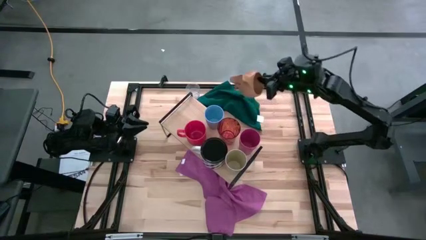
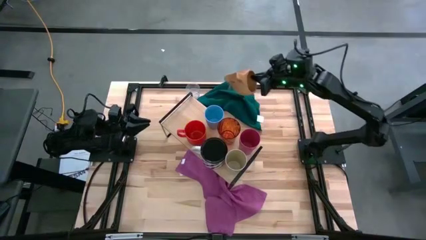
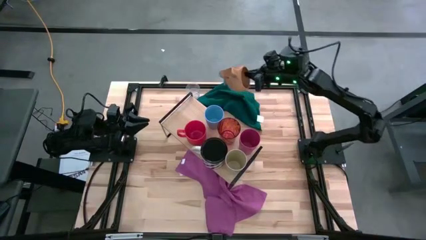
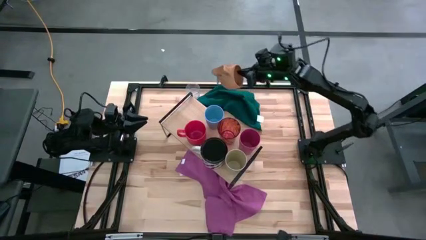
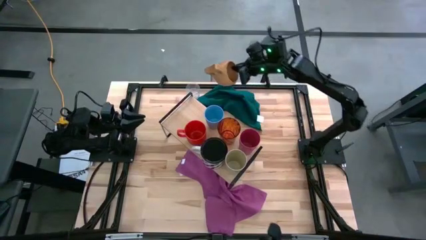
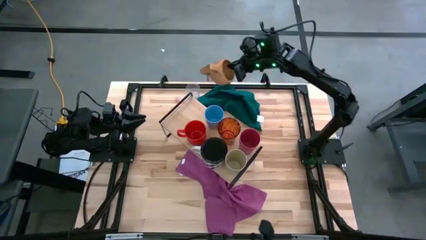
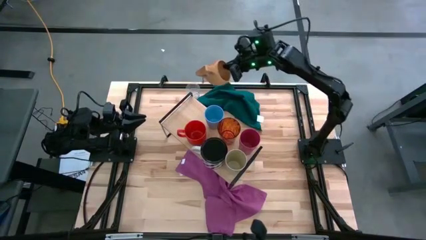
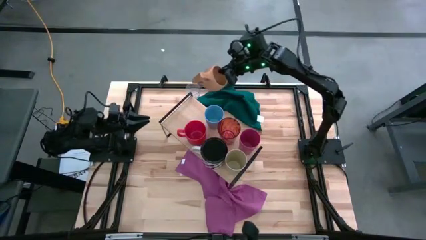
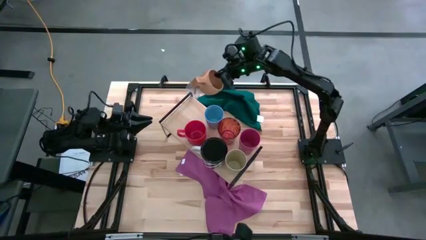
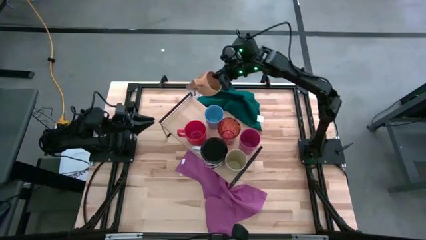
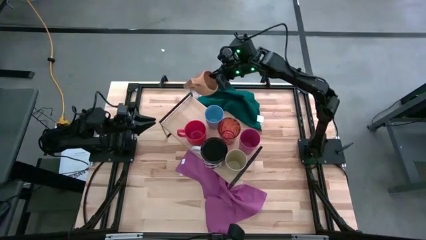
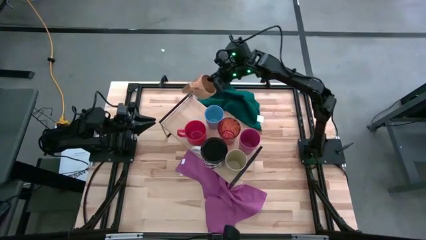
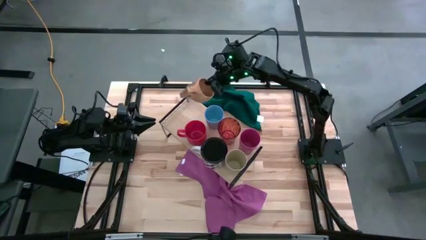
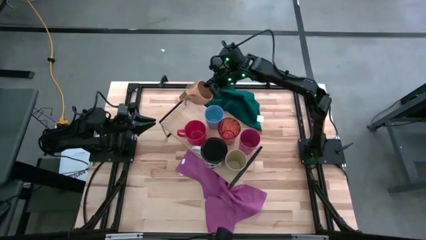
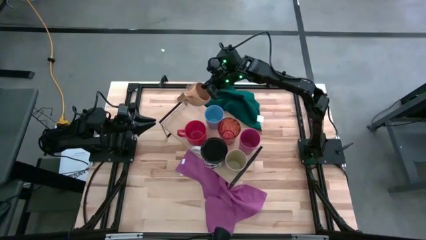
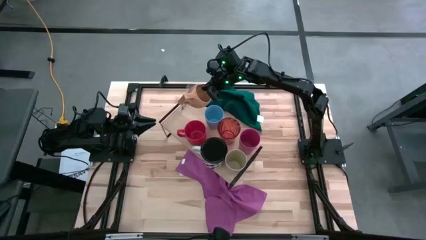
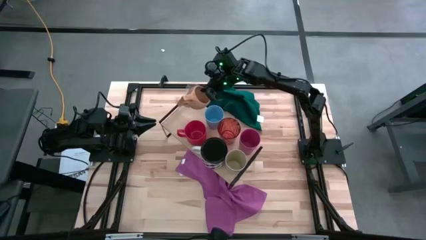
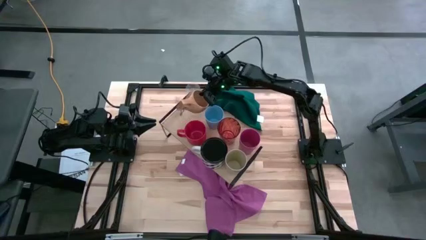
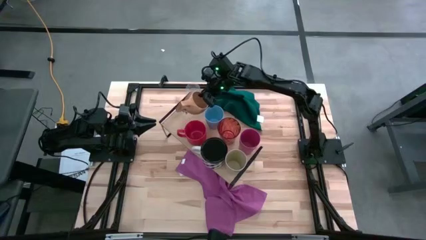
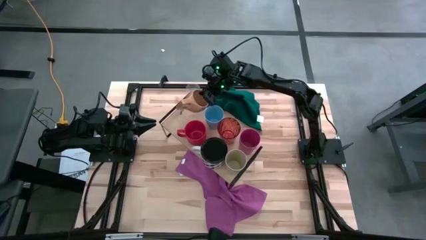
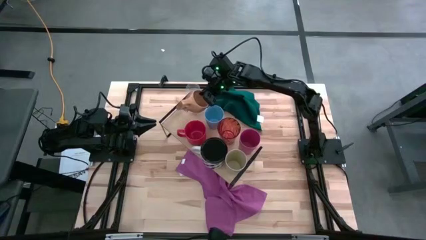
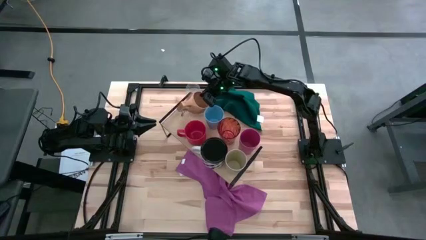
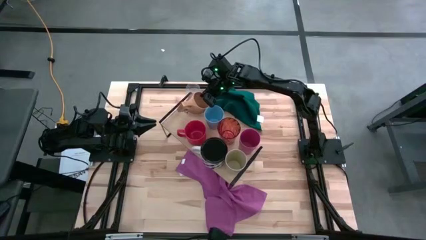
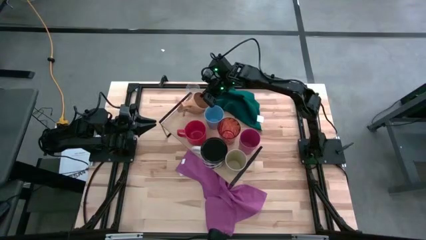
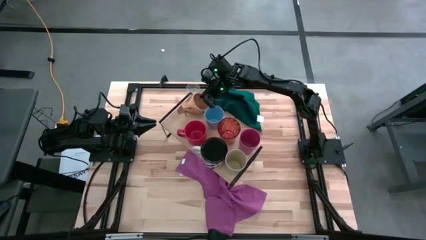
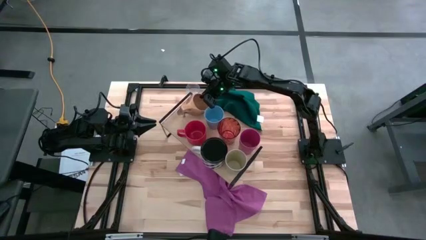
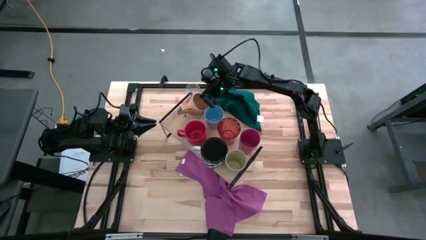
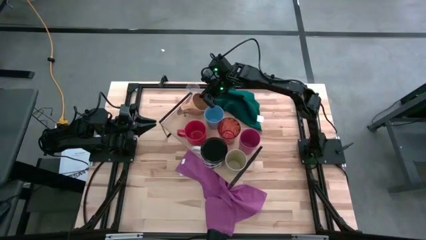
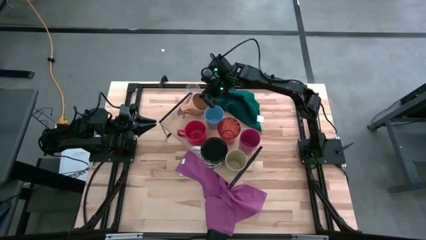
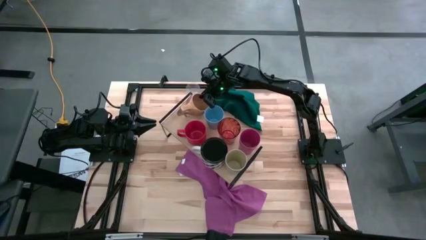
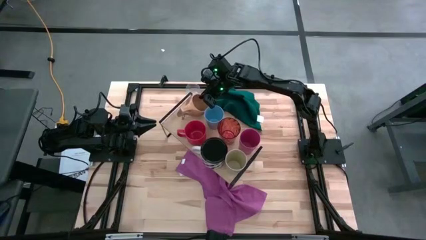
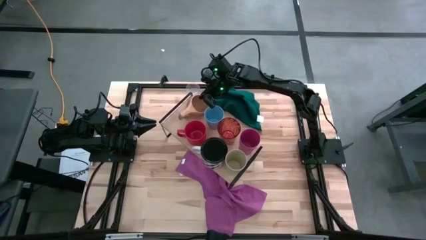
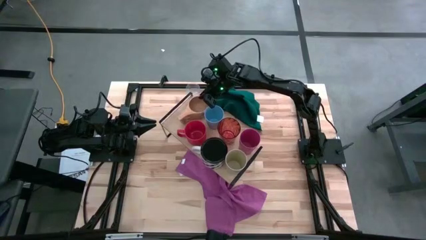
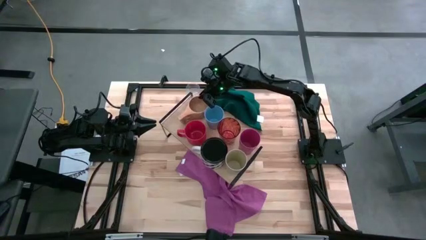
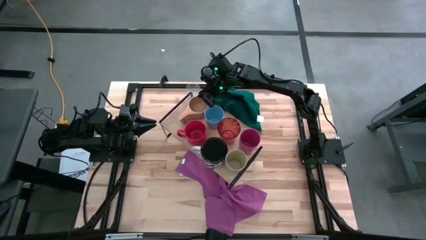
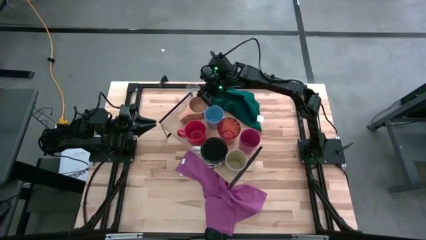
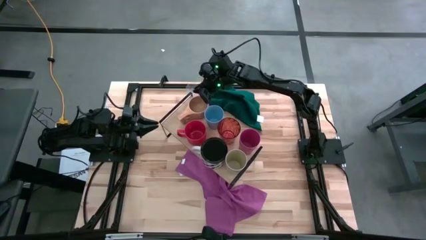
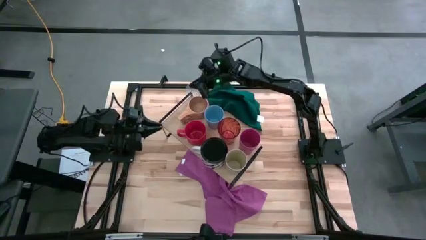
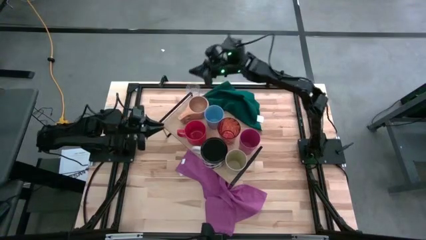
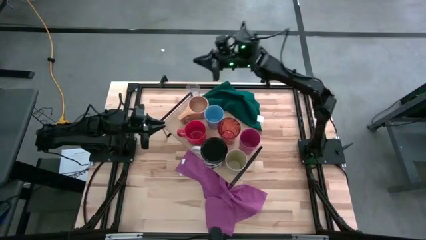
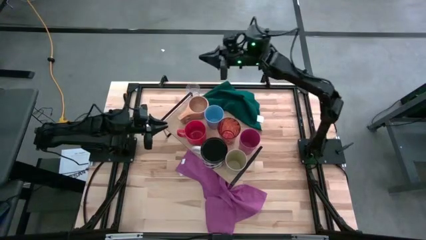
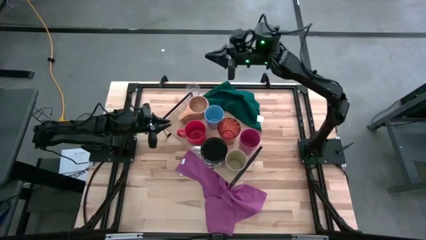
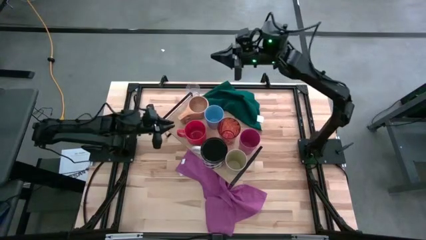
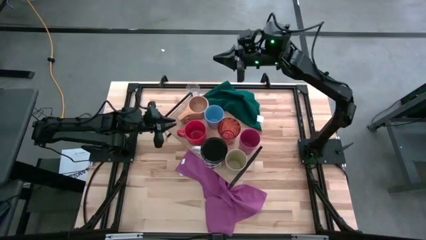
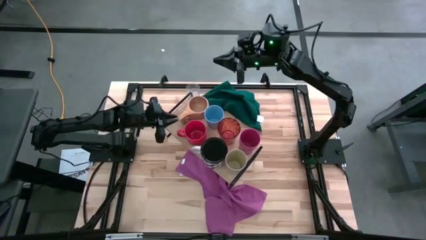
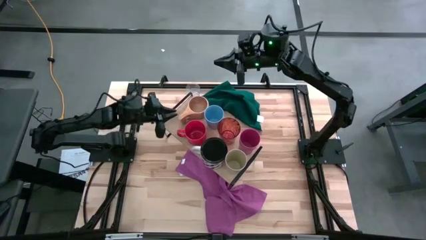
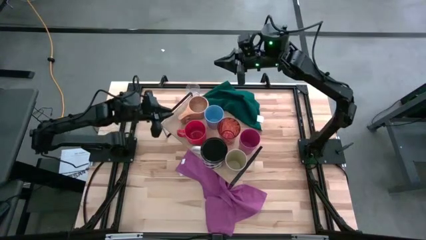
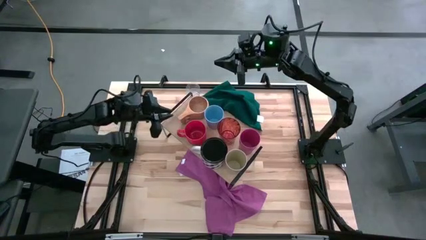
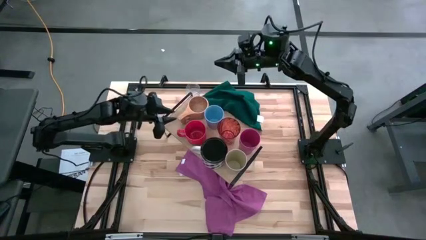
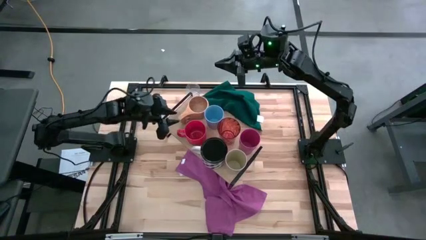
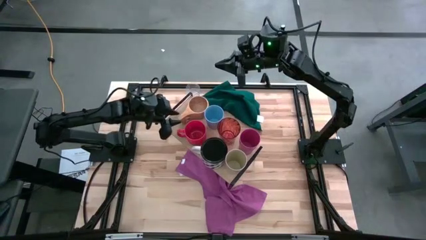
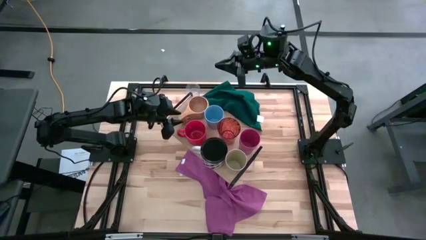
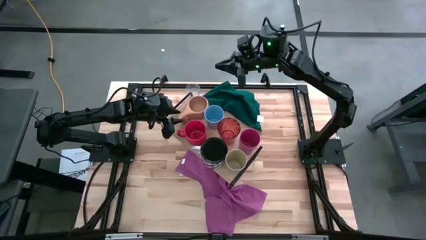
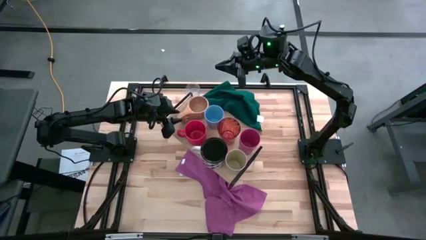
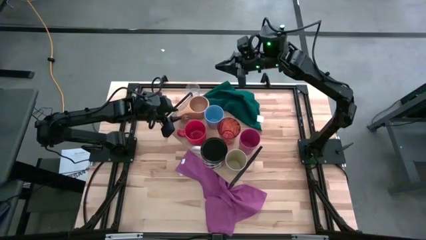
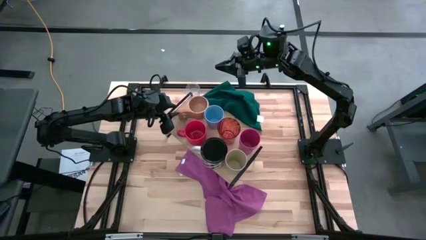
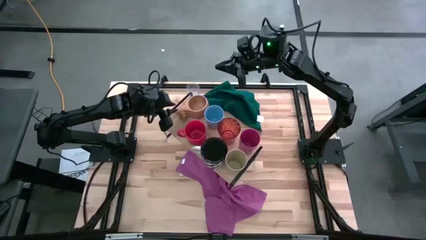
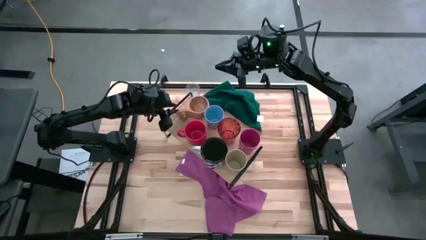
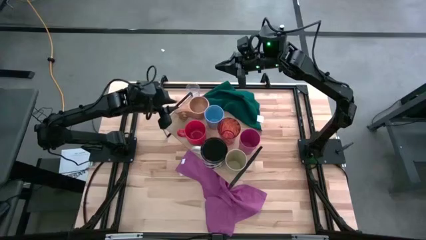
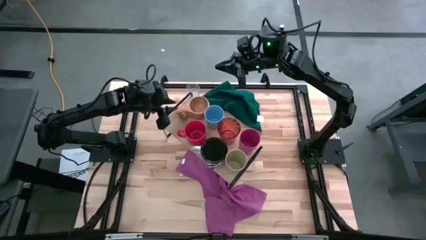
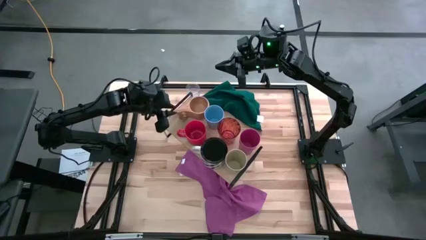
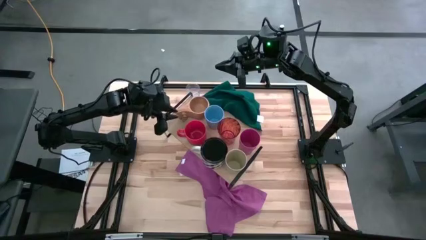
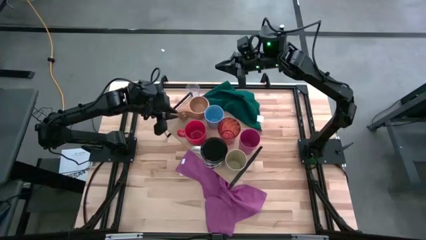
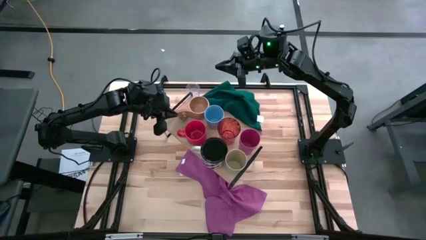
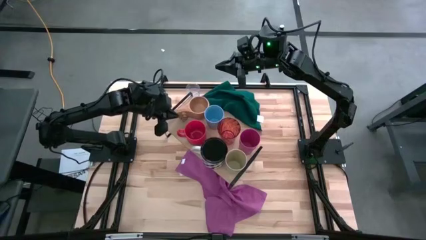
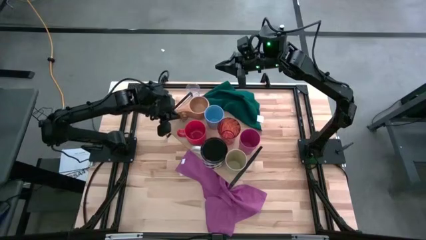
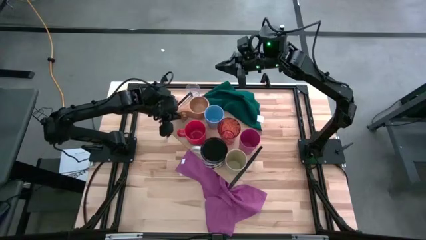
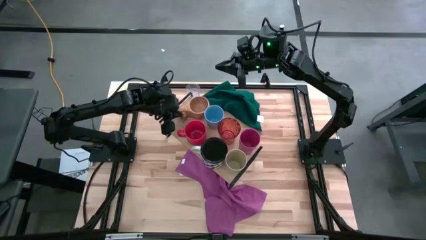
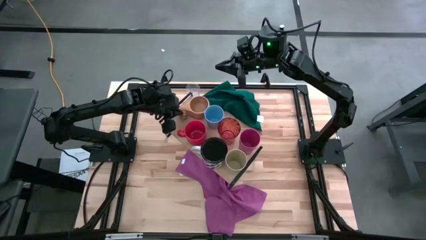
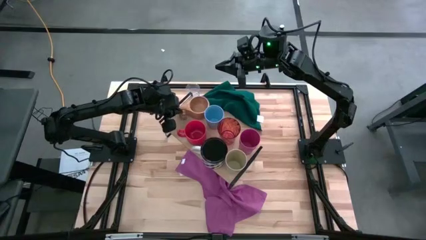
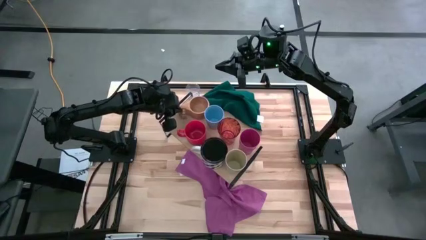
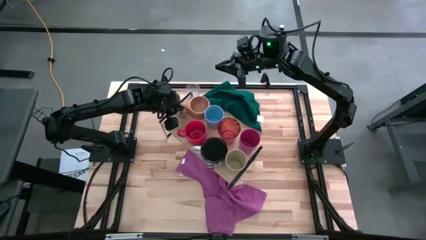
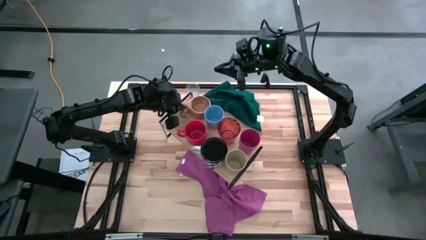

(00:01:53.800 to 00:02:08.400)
Task: Stack small to large cups/mugs on shelf
Put the brown mug on the shelf

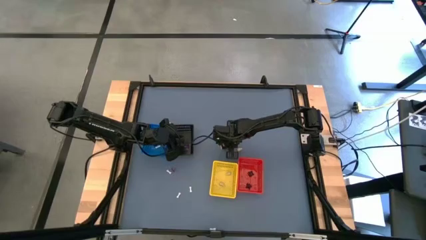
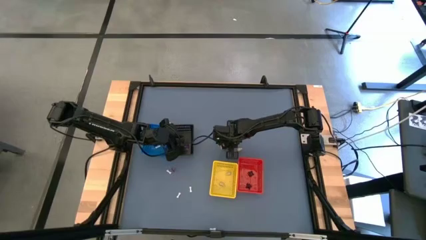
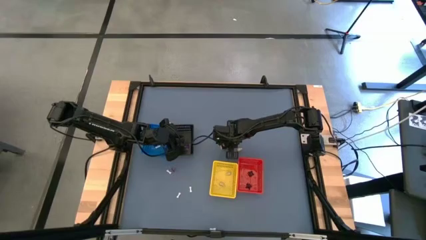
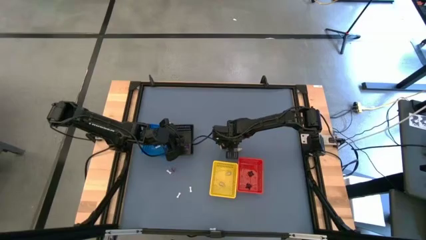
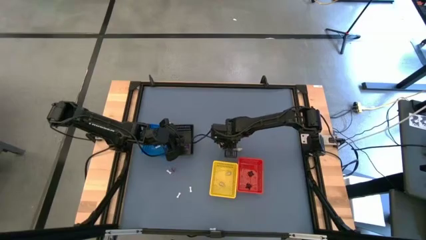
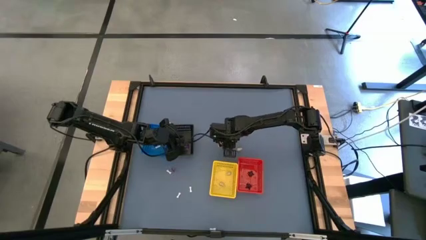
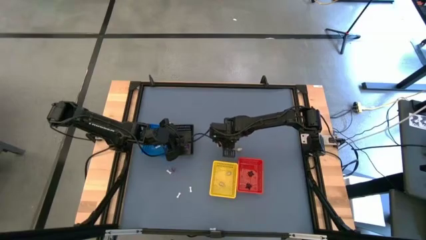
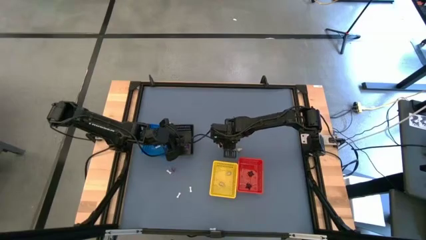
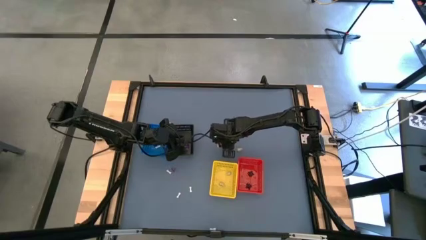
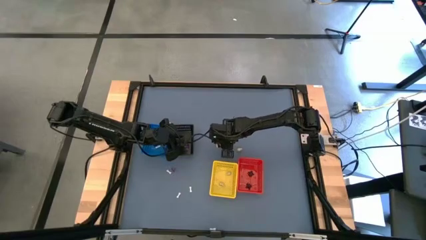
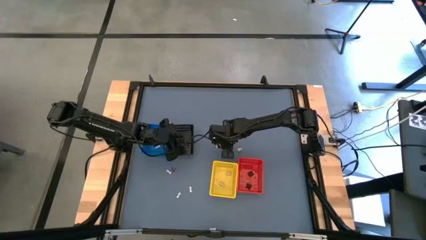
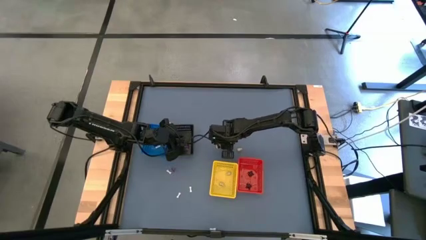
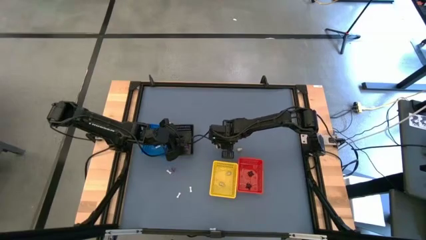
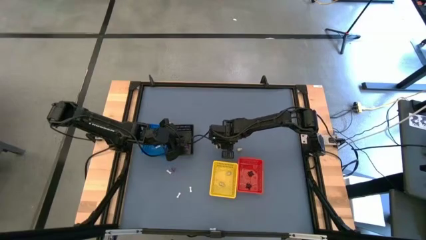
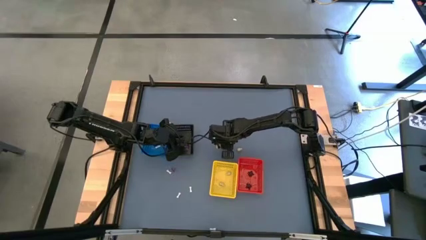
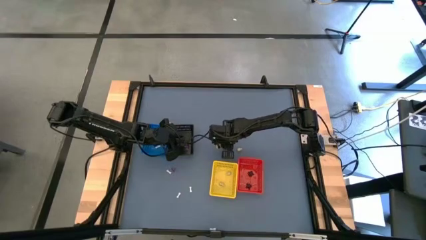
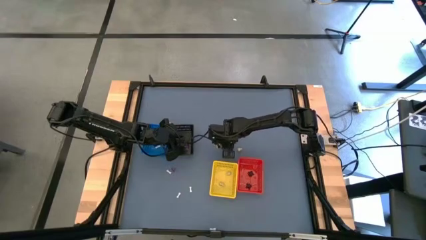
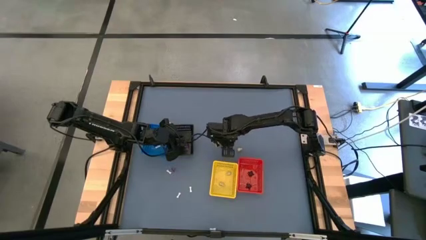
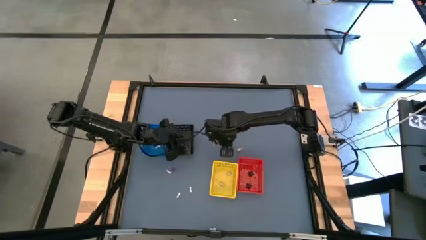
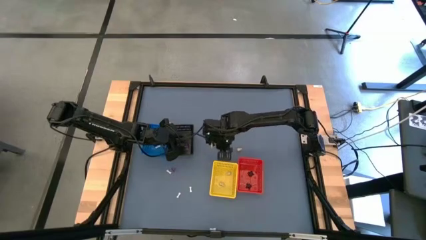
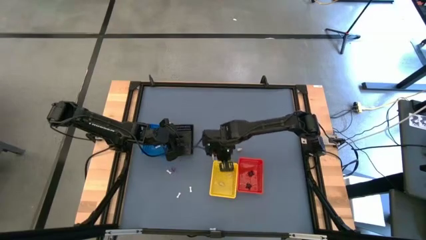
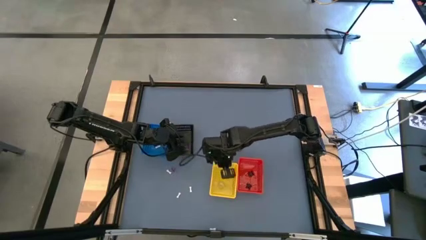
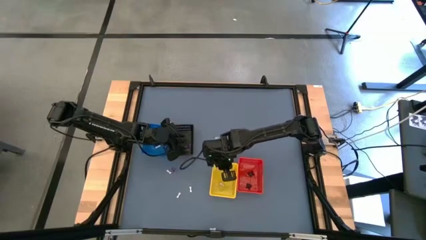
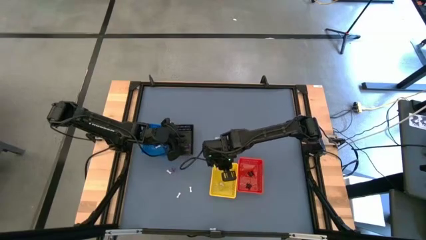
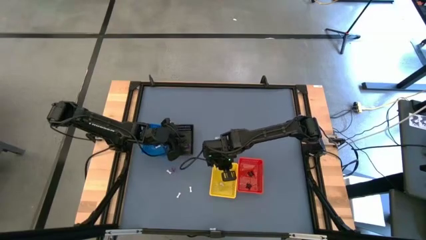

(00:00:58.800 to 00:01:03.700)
Task: Sort Halloween decoration
Put the skull toy into the yellow bin
